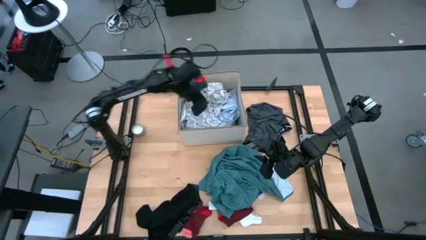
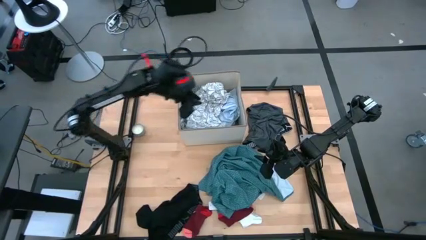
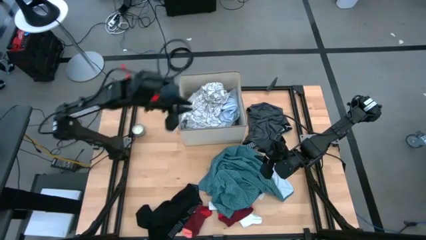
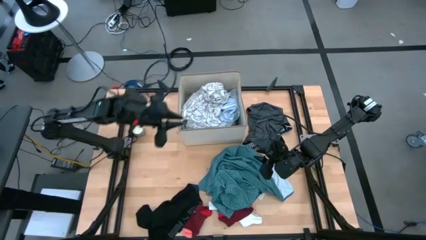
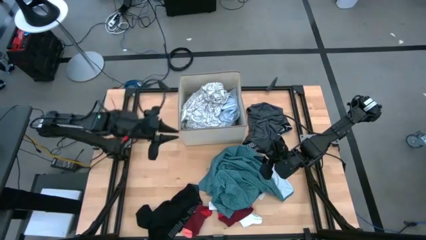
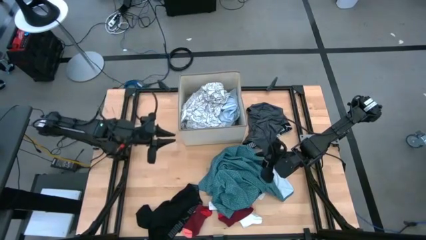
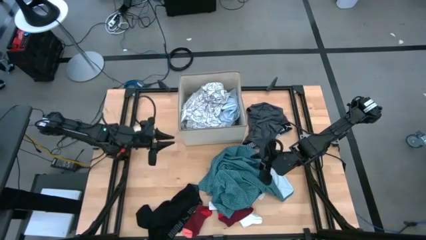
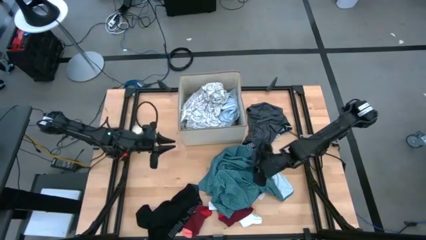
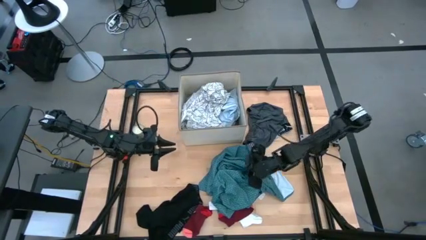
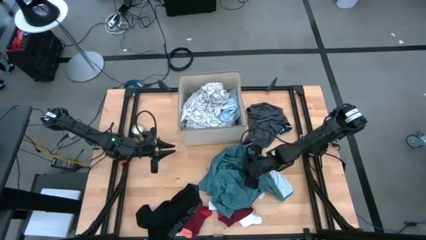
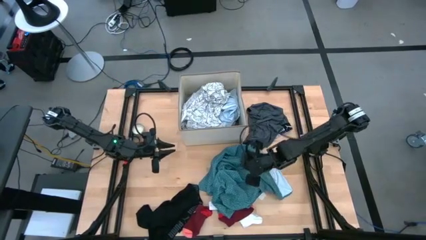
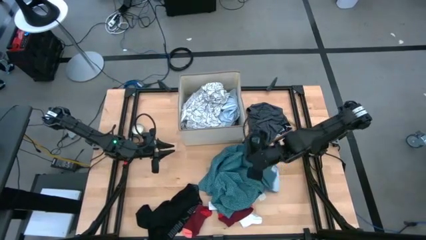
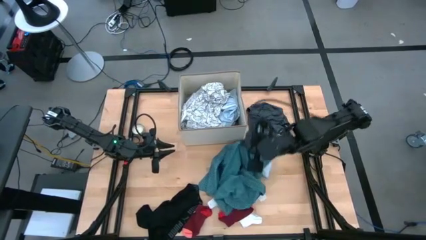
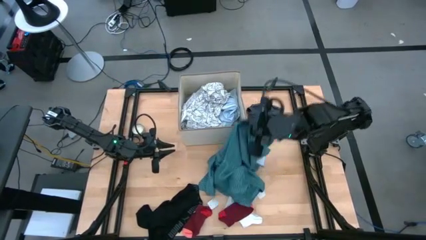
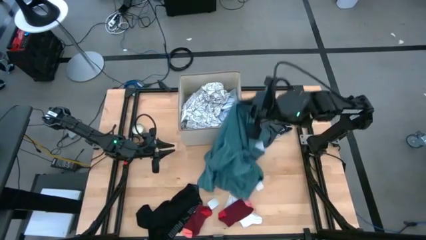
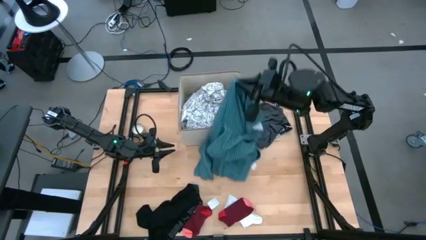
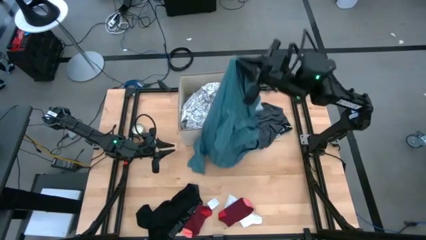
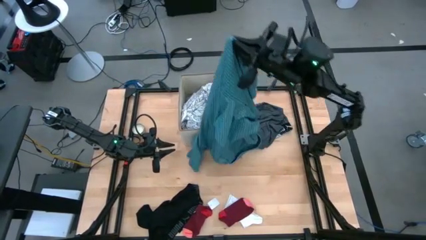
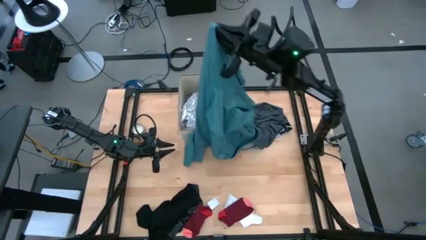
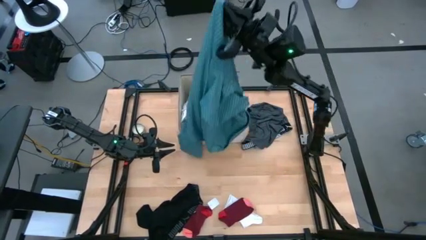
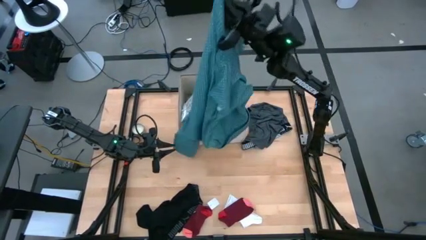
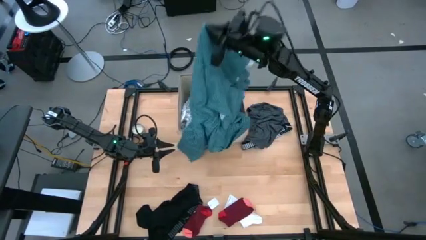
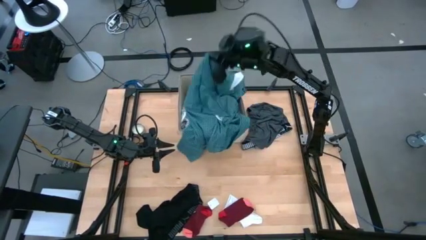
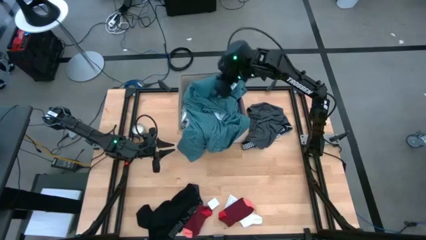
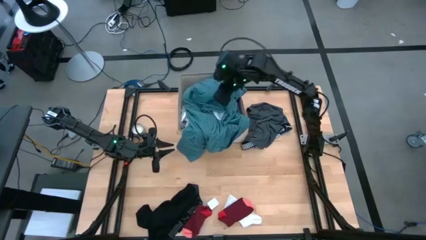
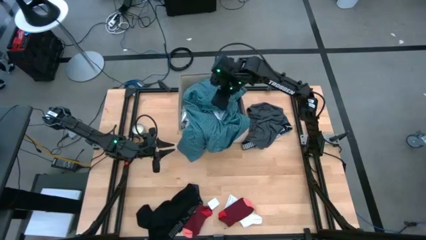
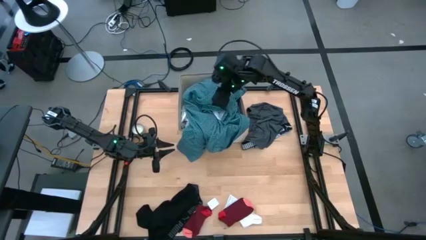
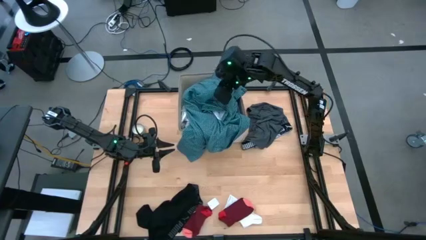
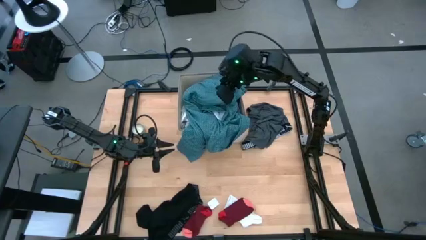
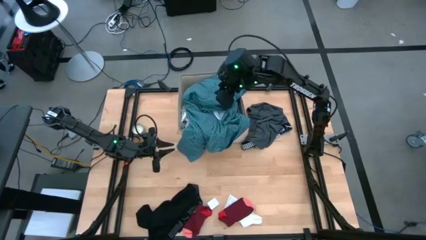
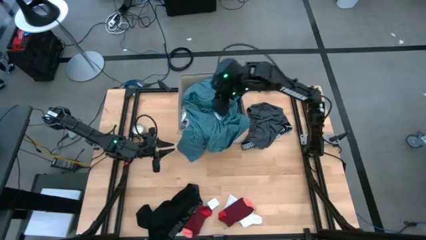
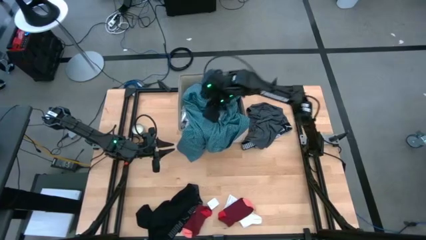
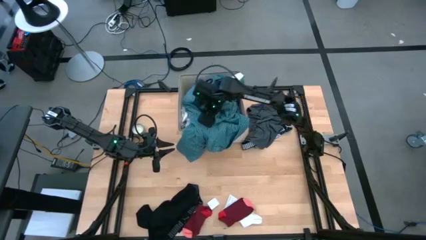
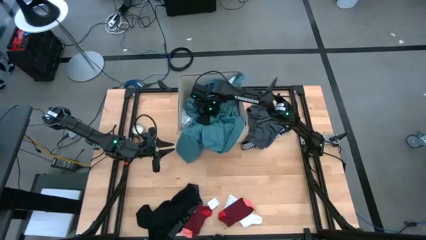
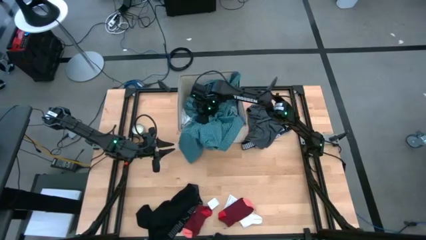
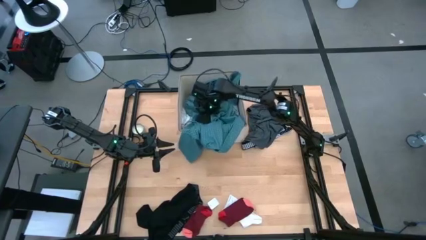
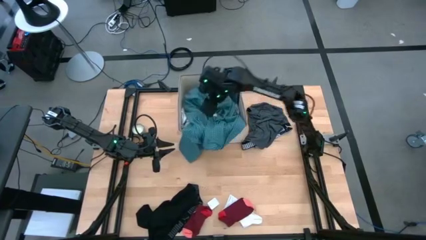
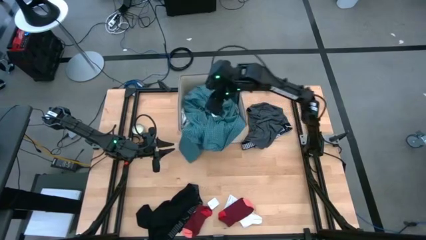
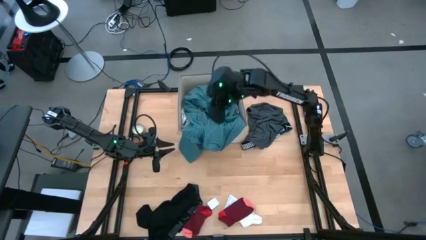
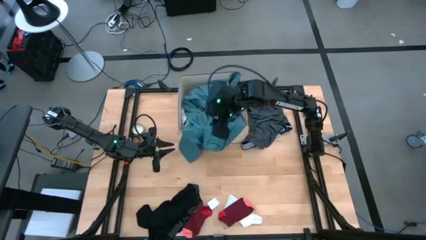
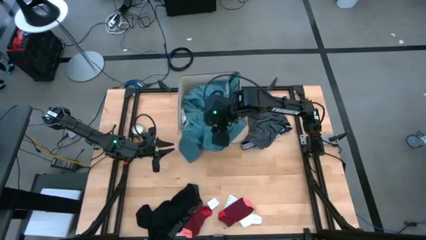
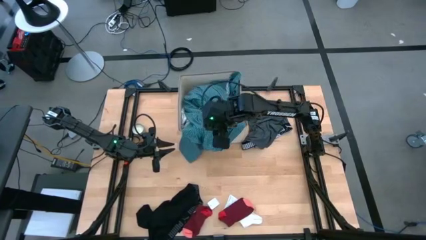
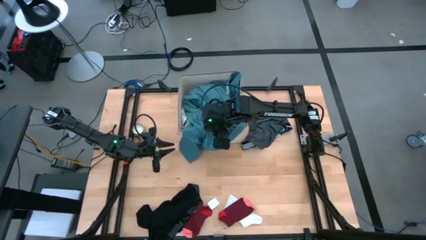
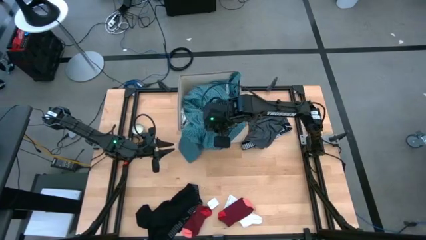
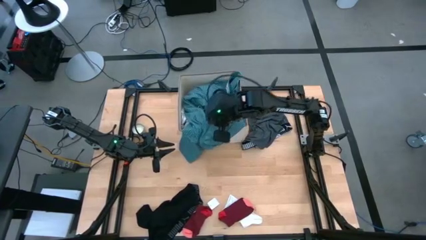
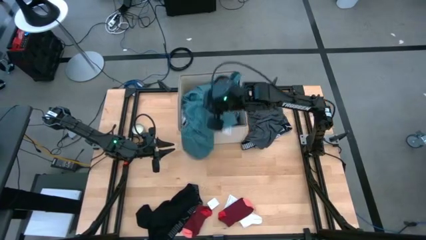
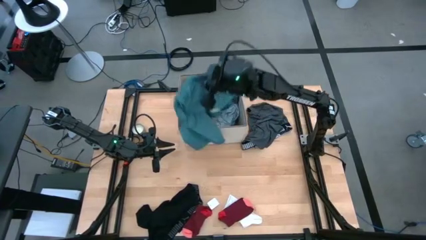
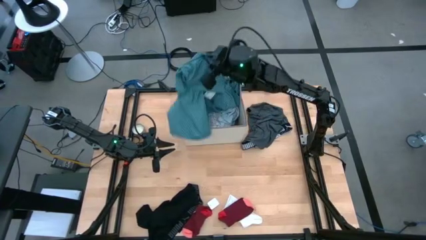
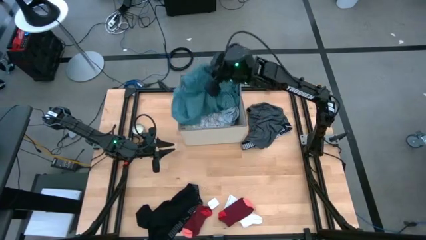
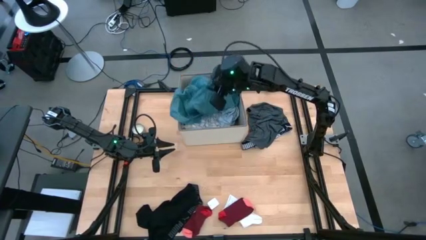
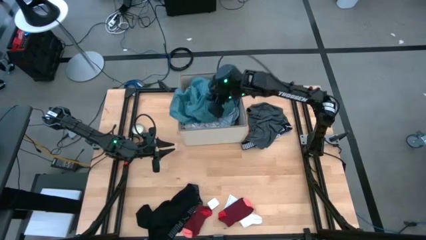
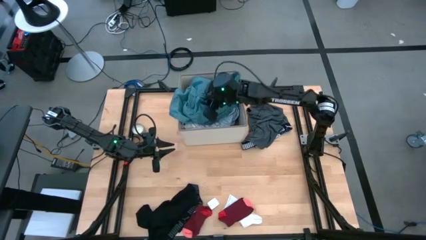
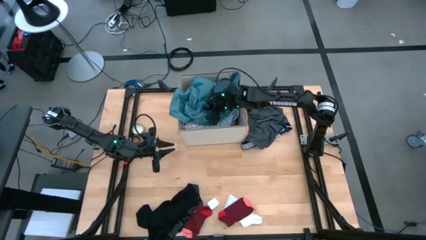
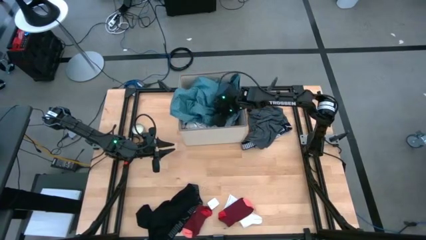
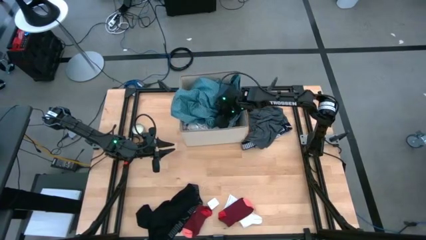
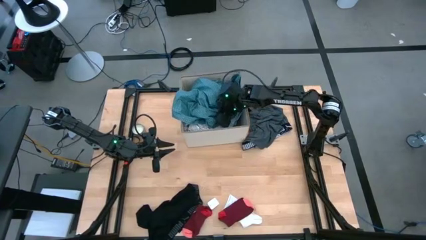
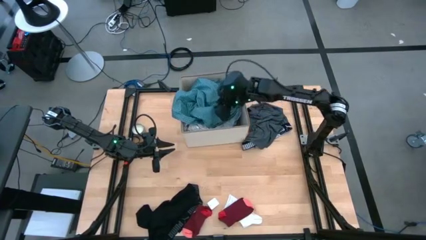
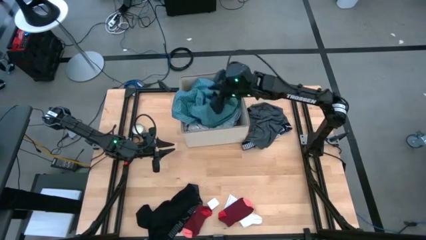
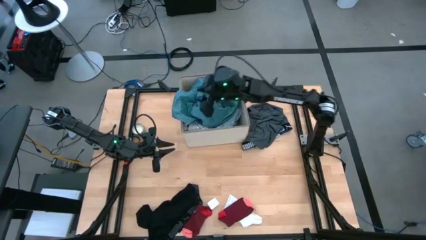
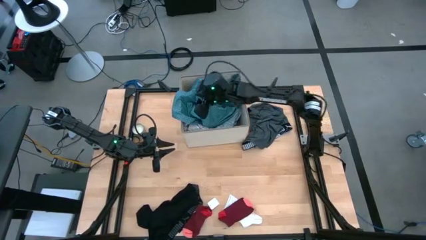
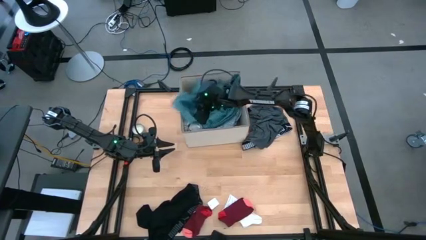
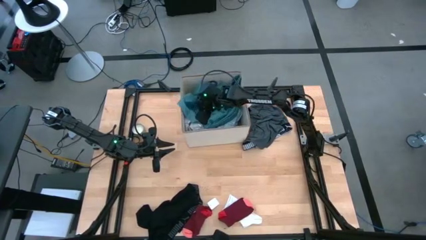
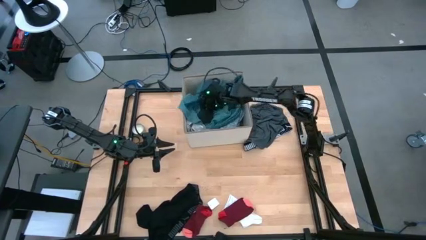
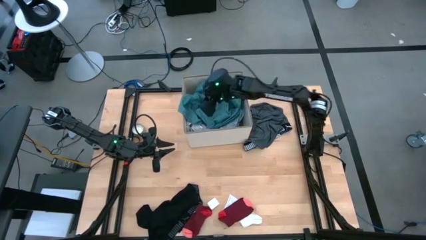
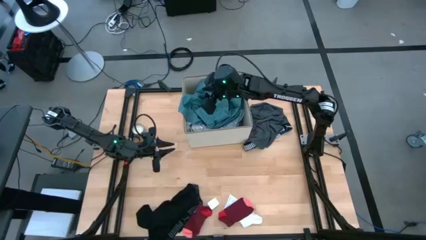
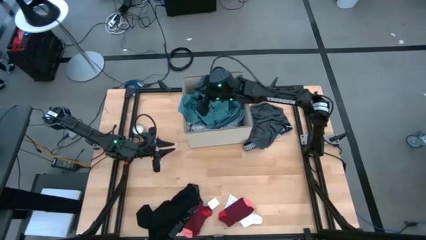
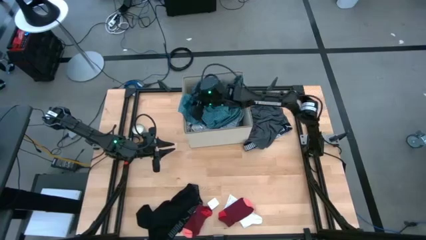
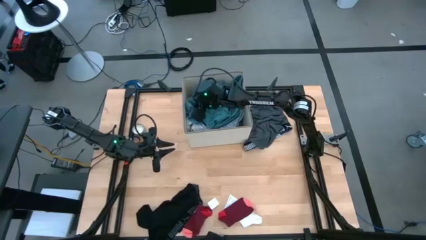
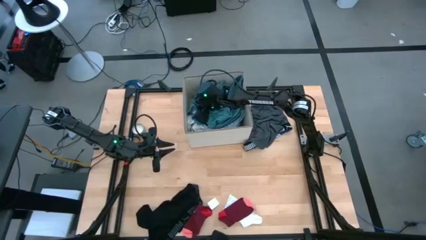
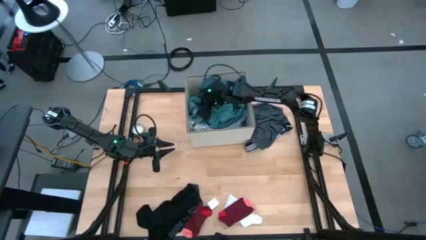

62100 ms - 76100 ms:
Task: Sort clothes
Put the green shirt into the laundry organizer

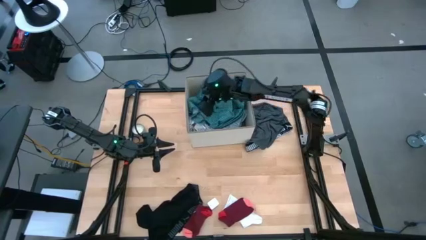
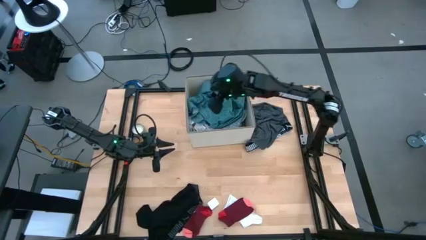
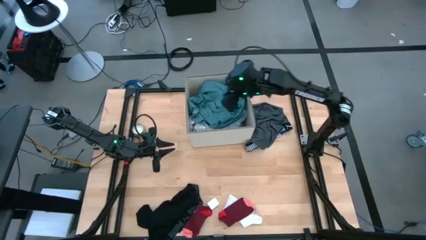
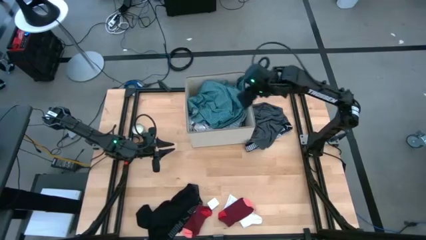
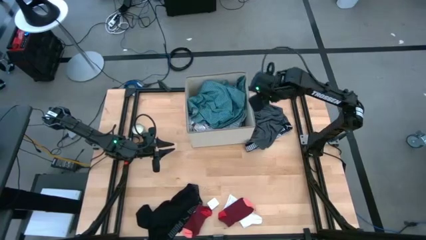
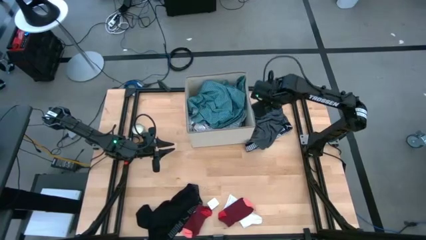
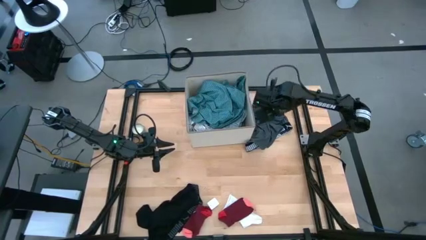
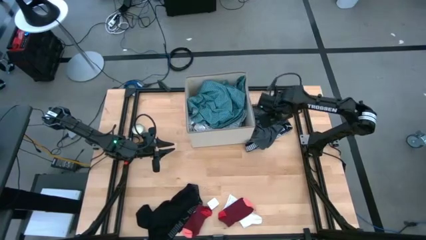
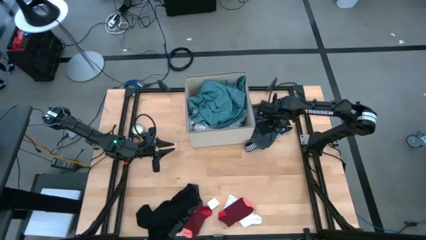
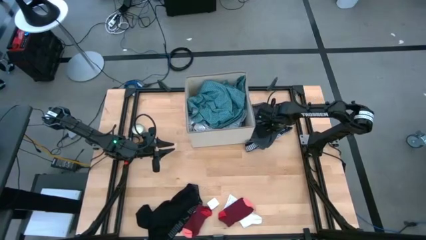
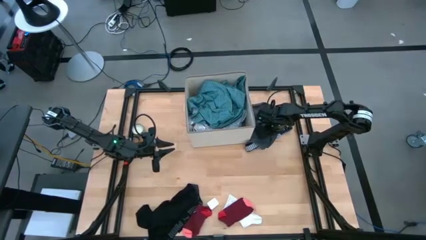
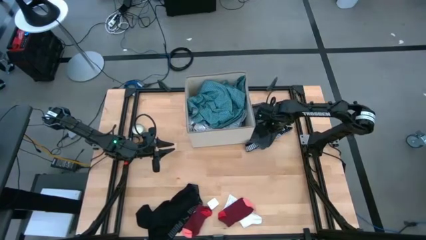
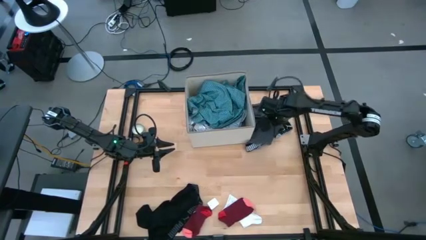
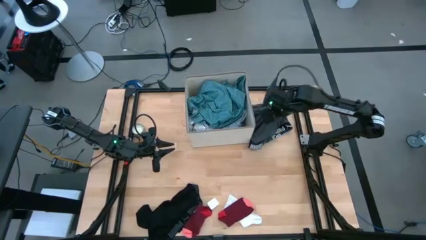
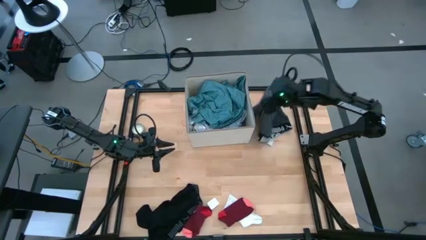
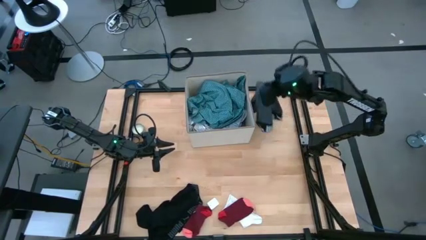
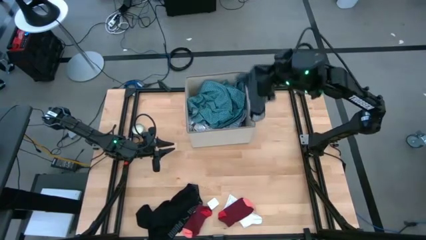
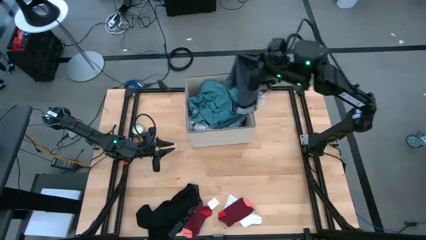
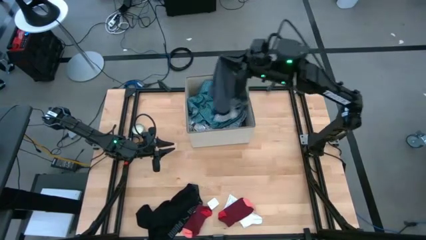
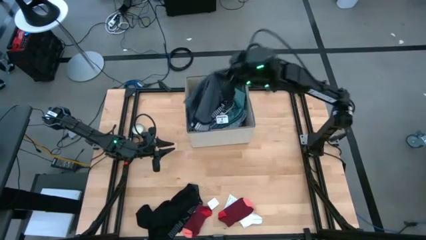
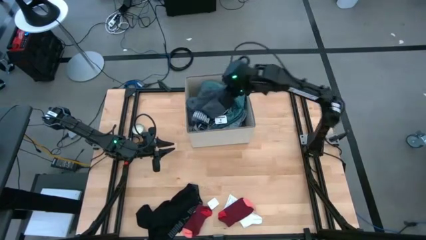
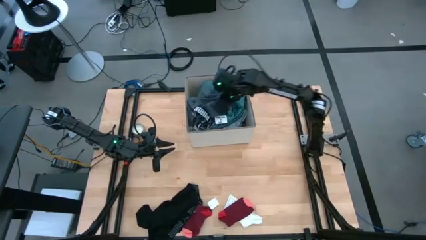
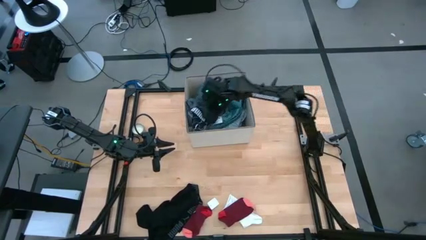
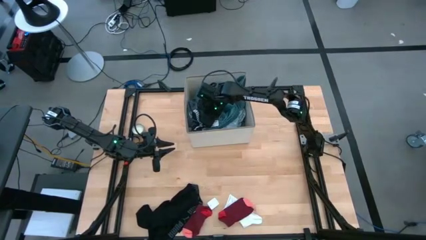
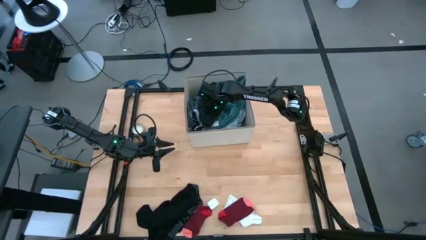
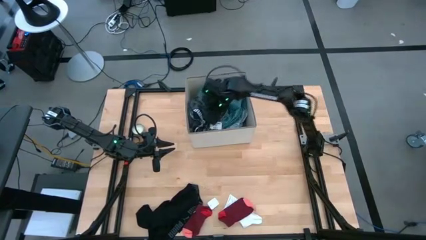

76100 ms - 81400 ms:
Put the gray boxer into the laundry organizer
